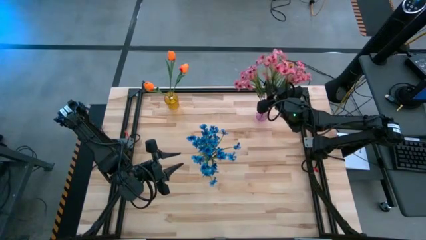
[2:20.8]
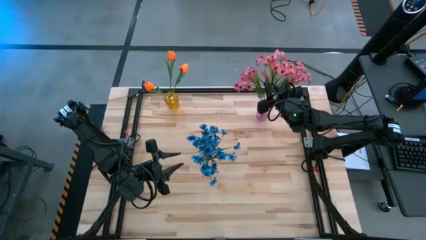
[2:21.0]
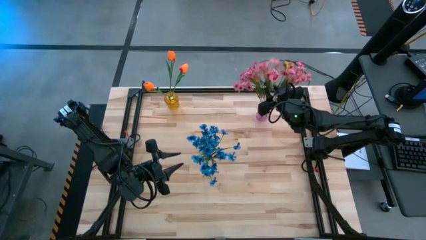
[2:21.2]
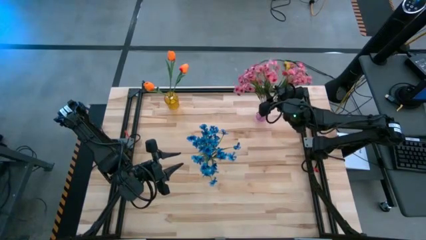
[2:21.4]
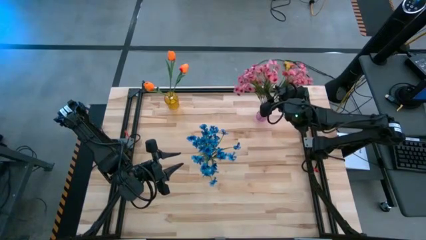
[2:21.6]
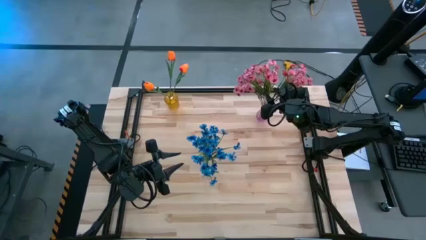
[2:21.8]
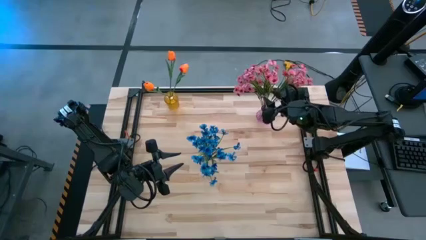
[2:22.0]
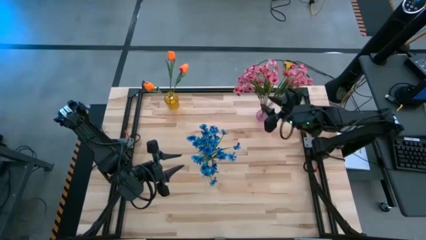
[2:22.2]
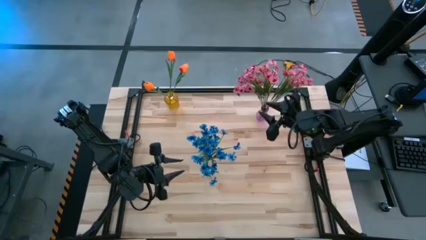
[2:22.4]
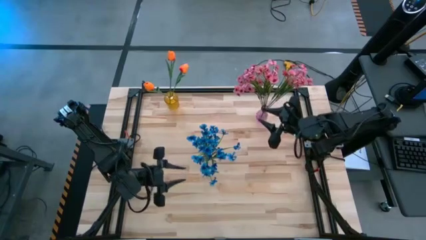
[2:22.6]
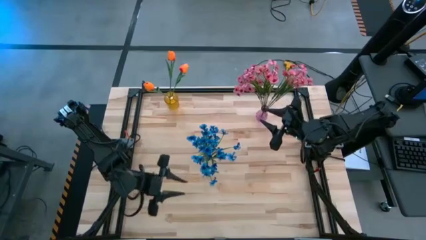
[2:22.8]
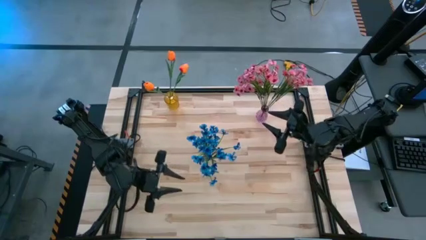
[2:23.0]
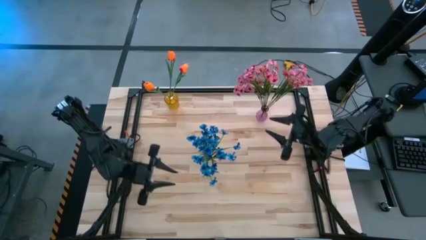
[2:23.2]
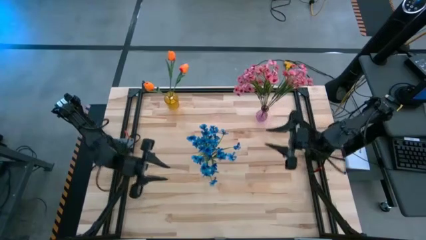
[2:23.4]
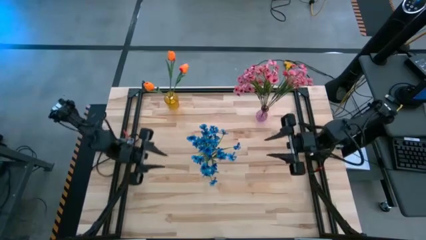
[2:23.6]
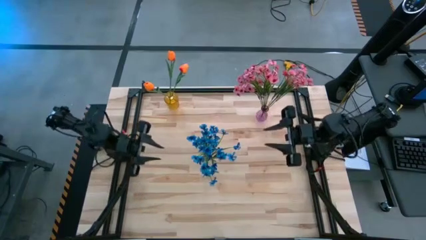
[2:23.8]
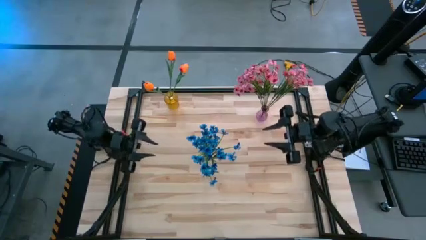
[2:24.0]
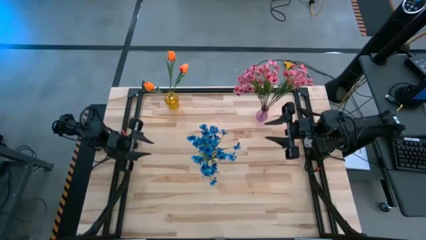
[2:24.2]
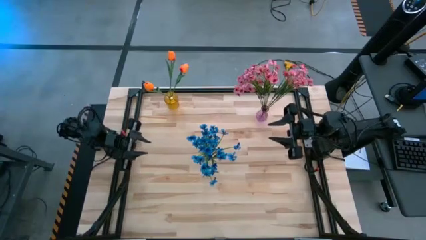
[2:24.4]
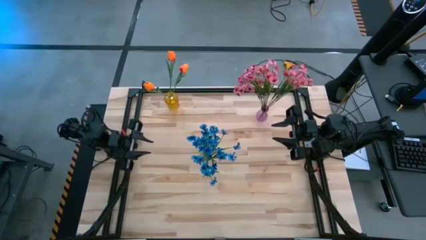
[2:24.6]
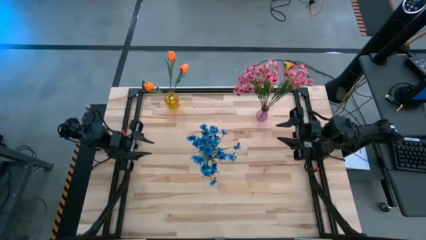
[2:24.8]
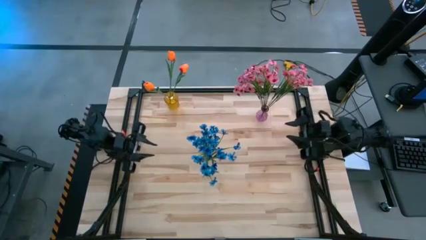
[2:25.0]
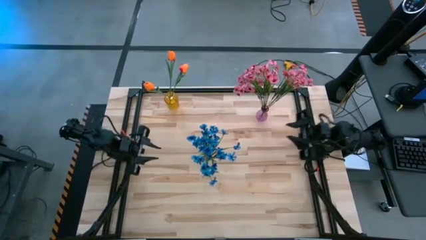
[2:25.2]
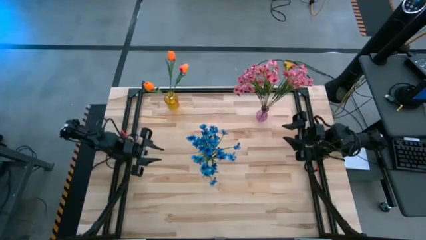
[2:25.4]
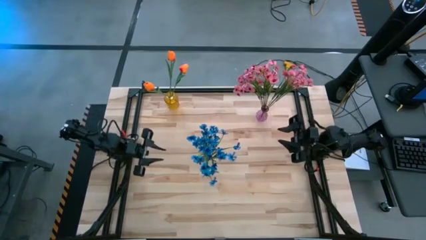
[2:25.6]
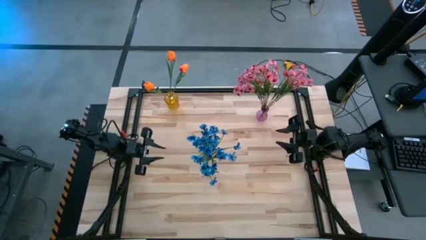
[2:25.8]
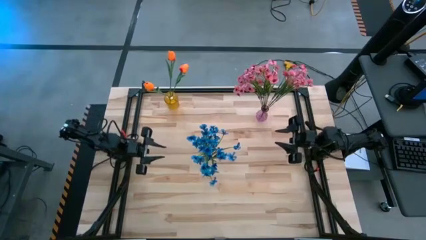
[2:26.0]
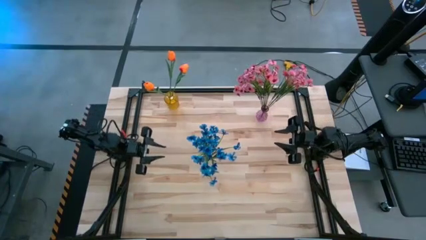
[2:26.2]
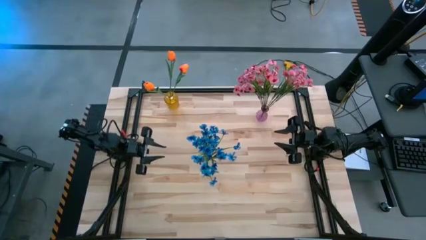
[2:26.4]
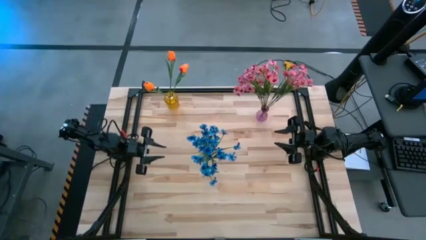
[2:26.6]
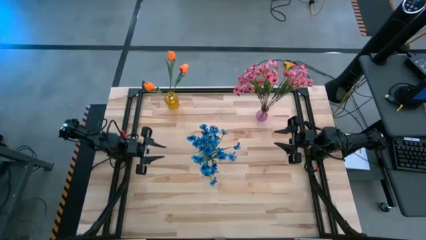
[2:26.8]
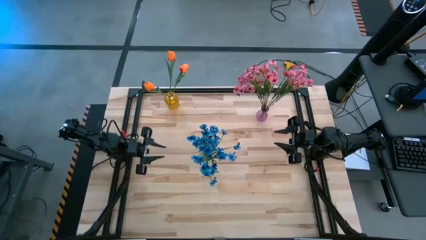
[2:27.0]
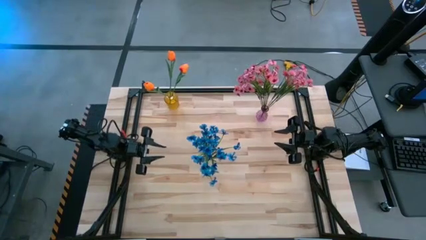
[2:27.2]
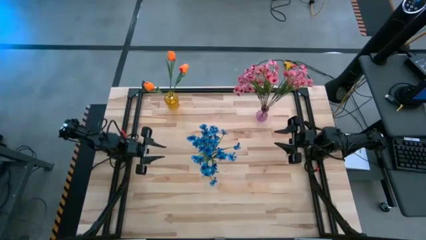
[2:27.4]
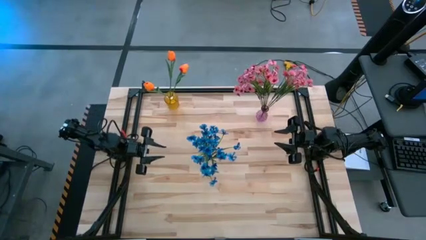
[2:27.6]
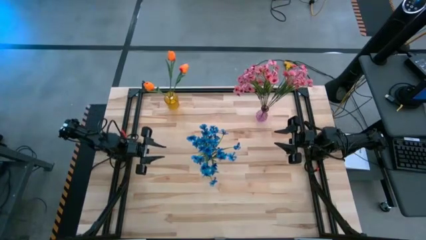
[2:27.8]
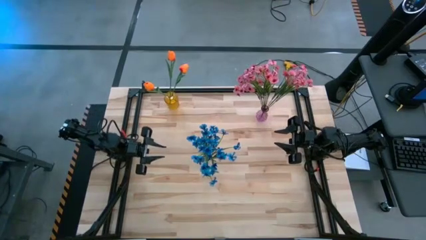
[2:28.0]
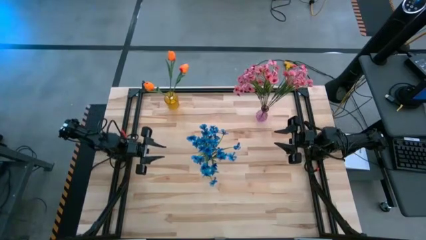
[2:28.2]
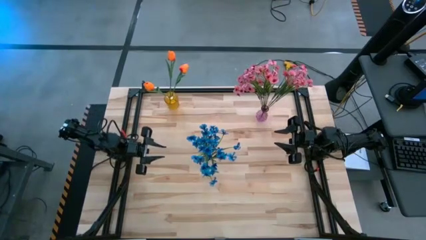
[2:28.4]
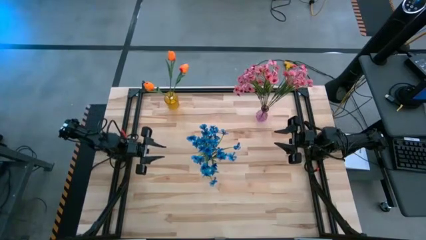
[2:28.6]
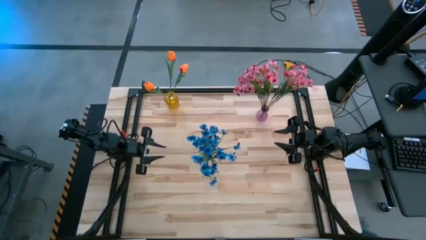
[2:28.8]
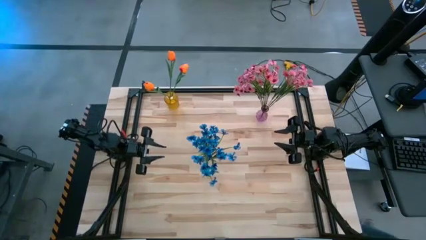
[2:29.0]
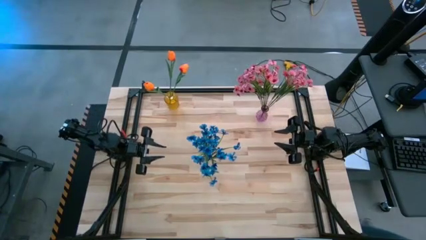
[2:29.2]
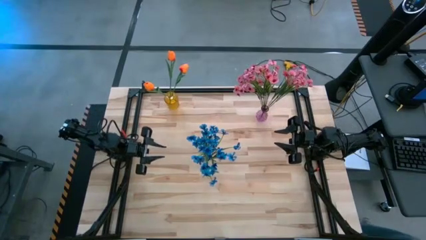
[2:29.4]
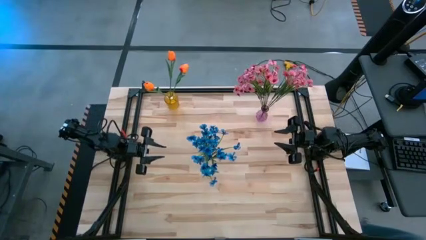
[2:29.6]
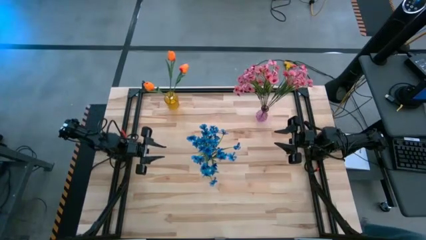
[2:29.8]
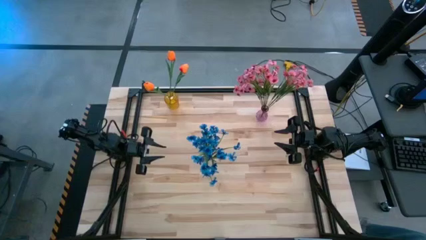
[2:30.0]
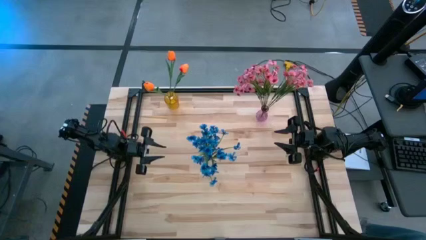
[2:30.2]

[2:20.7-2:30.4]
Task: Sort flowers into vase by color
Return to Home Position

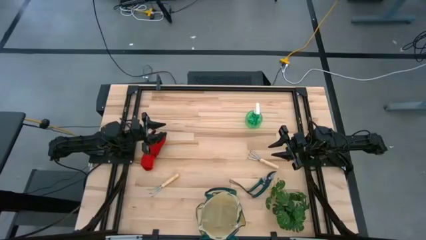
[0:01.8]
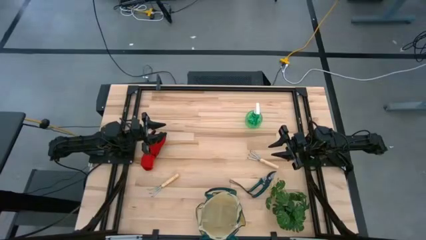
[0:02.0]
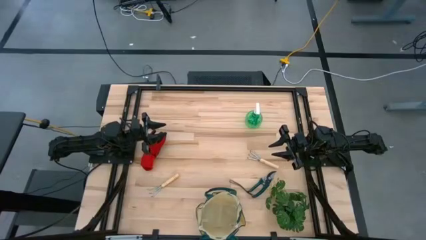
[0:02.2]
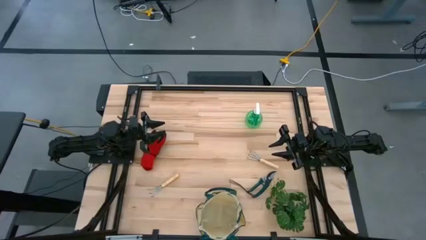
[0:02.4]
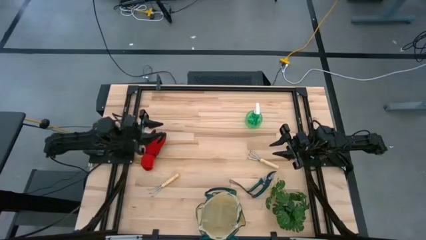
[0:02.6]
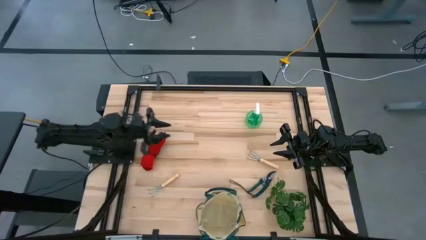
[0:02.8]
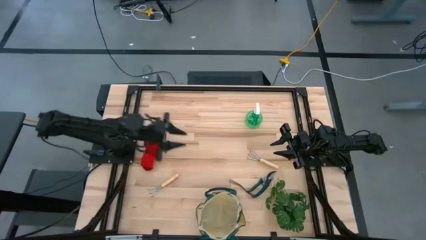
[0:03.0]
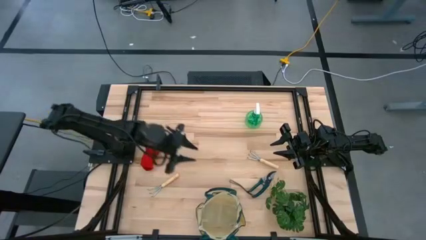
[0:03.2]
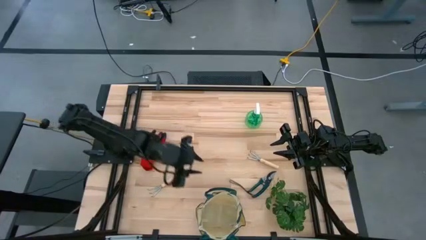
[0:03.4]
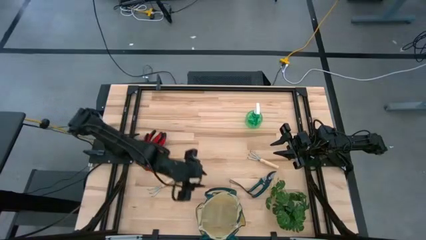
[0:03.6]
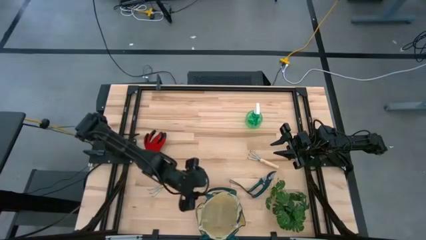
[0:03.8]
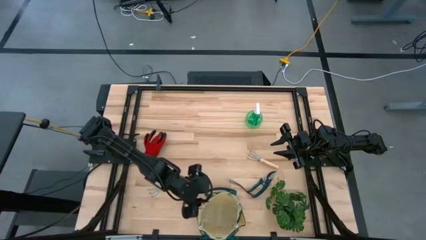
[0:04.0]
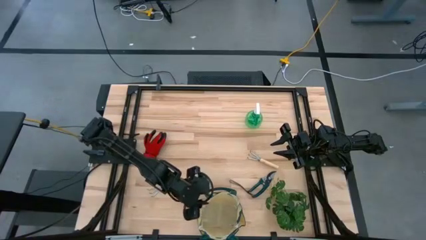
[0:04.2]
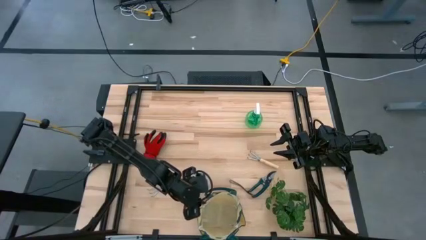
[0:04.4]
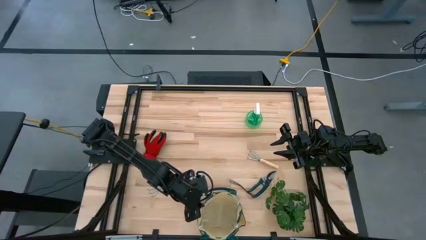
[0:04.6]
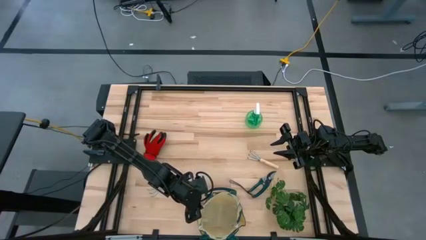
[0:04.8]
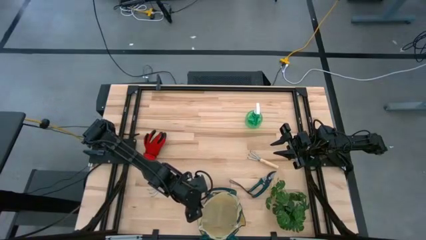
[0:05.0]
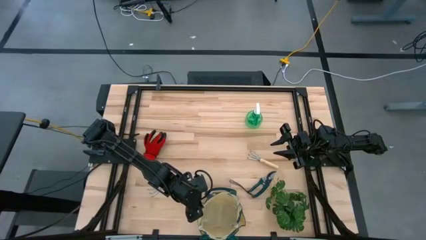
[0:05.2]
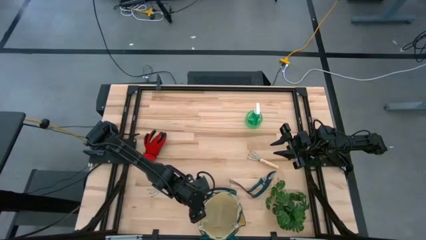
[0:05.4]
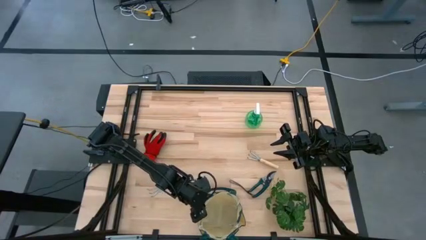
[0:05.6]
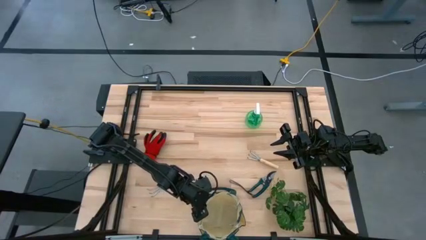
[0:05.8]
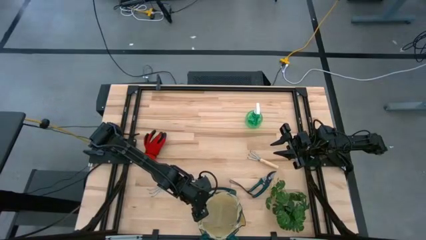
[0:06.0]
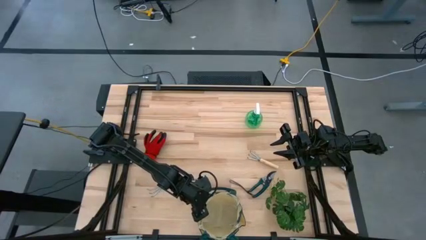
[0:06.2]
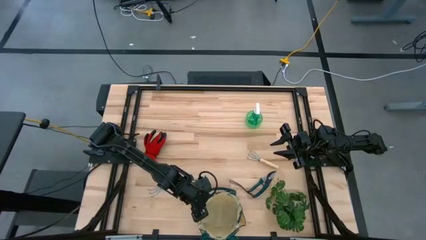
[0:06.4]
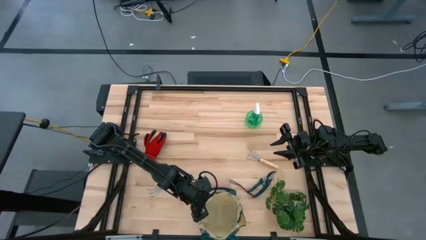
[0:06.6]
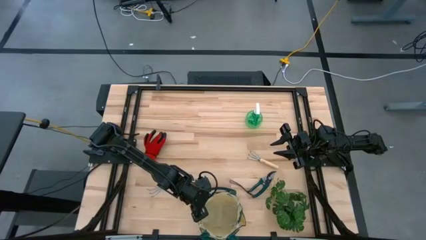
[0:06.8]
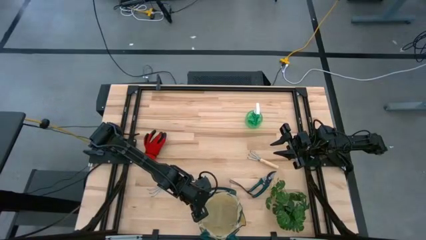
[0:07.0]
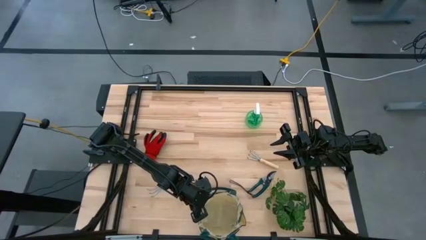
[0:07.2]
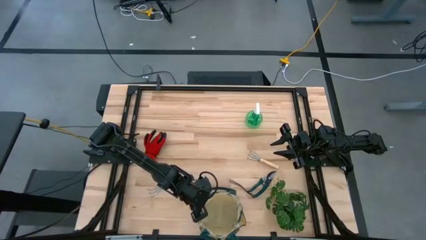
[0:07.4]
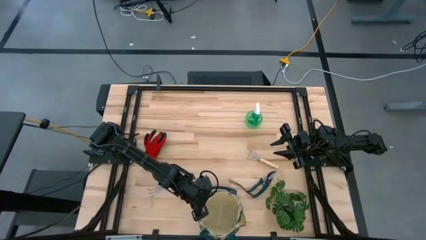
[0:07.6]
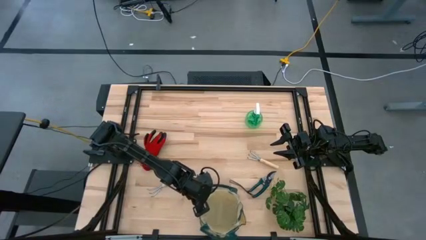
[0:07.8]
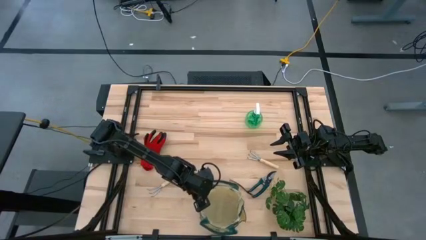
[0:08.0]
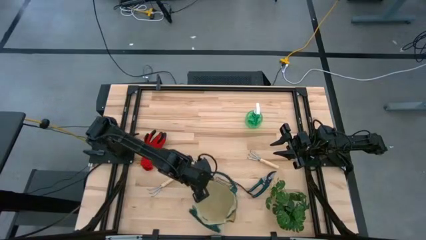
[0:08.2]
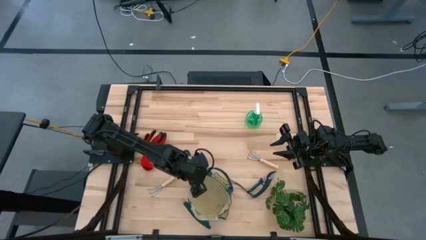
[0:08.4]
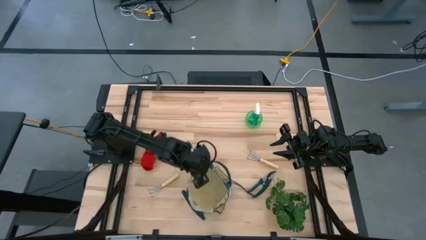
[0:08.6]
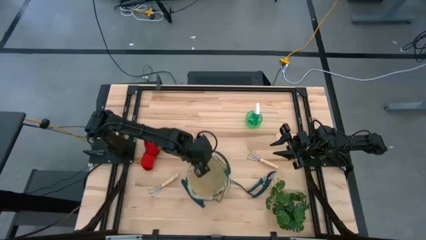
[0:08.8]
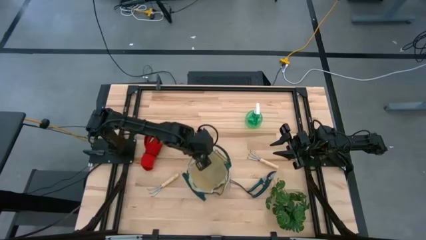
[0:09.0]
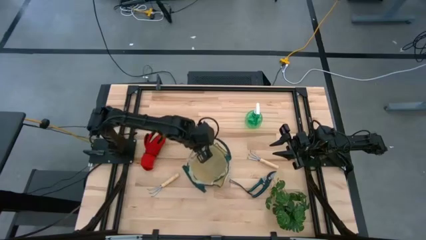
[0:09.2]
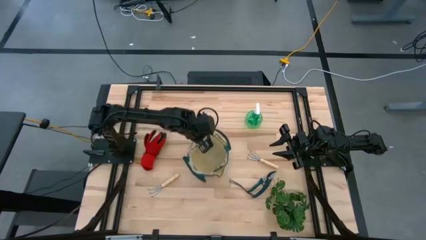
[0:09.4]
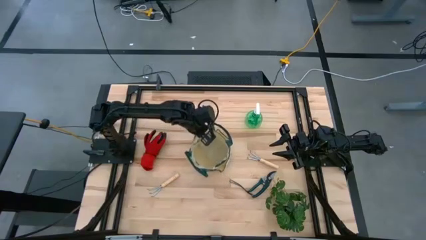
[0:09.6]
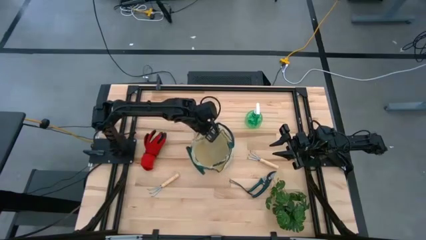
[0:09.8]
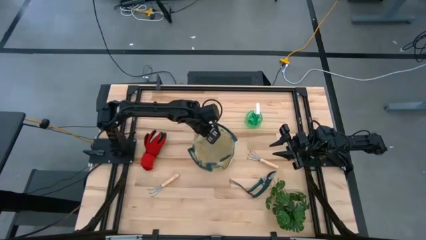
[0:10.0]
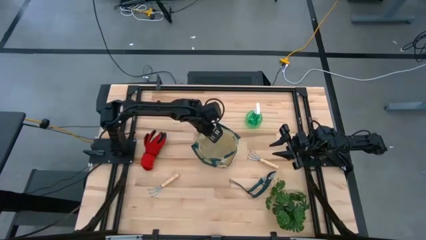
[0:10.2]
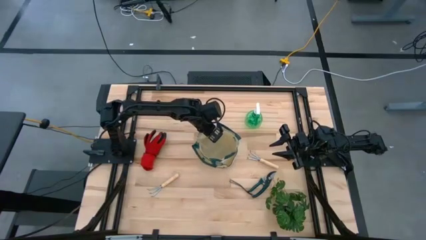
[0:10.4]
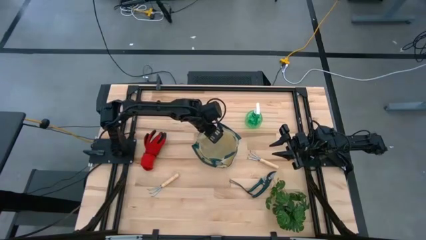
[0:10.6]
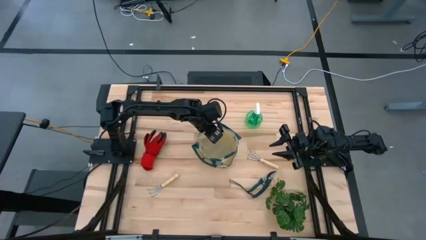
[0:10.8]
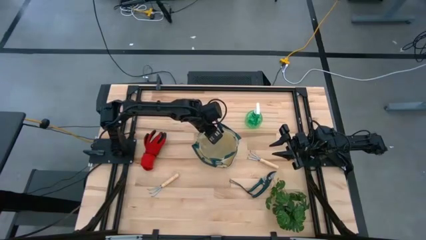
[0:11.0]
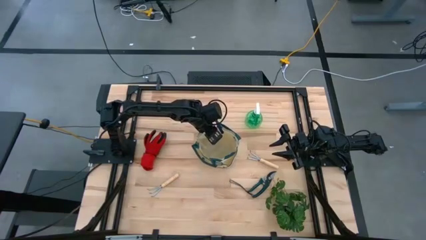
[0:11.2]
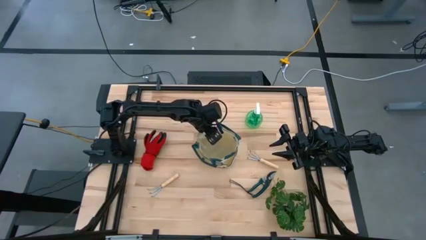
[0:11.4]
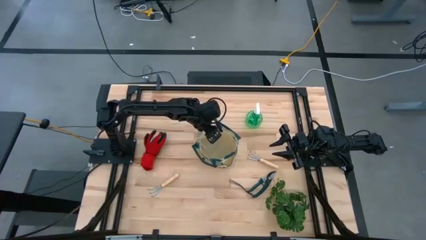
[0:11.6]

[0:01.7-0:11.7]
Task: Pick & Place Garden tools in Gardening bag
Move the green gardening bag to the center of the table
